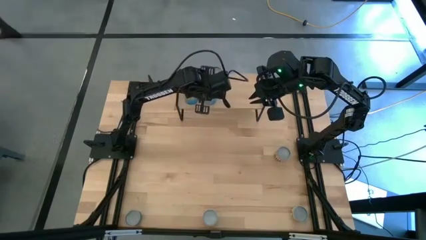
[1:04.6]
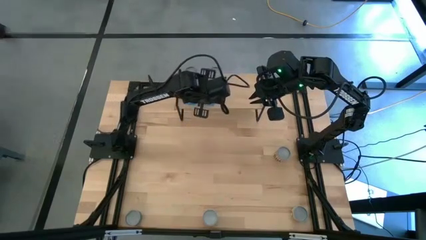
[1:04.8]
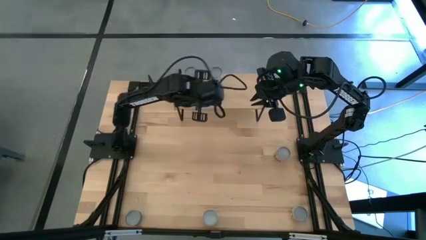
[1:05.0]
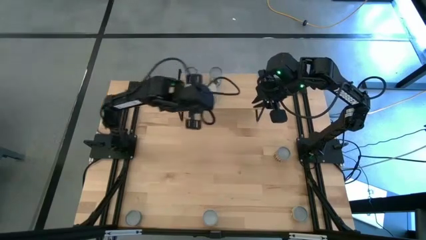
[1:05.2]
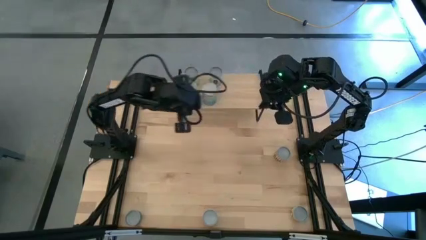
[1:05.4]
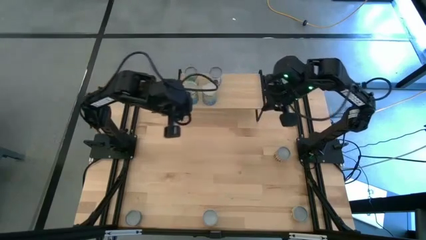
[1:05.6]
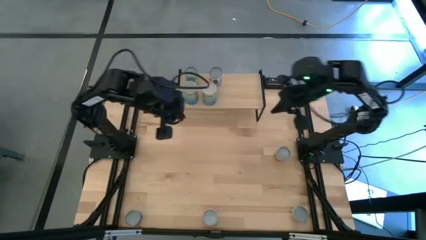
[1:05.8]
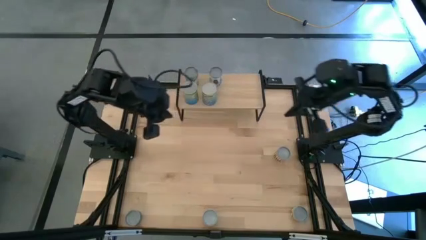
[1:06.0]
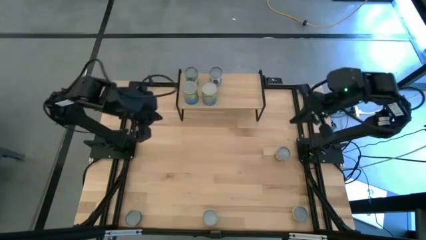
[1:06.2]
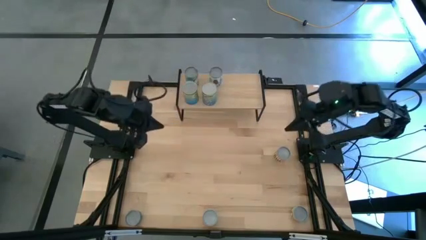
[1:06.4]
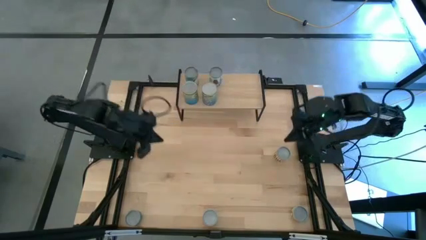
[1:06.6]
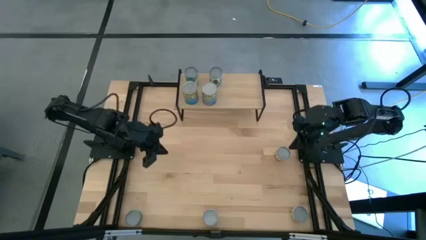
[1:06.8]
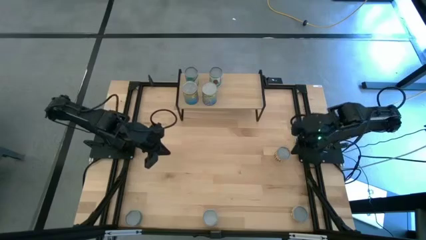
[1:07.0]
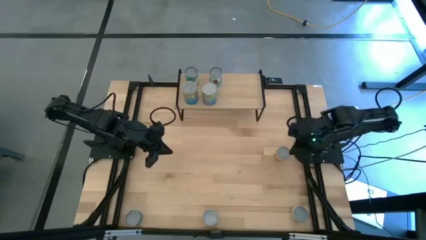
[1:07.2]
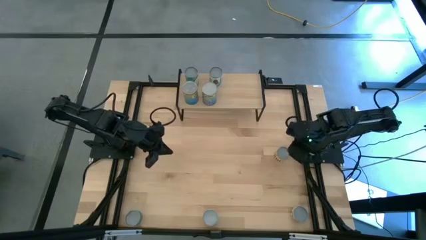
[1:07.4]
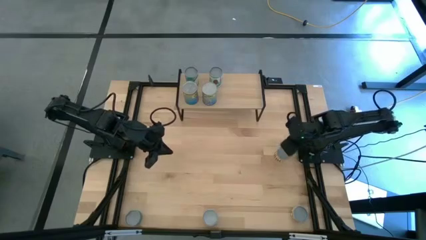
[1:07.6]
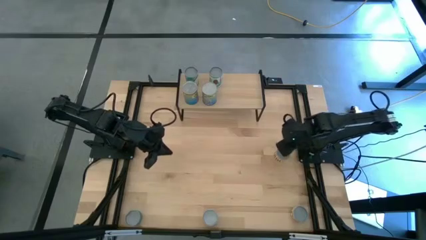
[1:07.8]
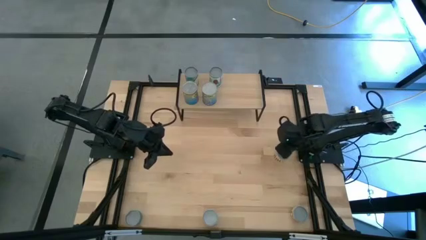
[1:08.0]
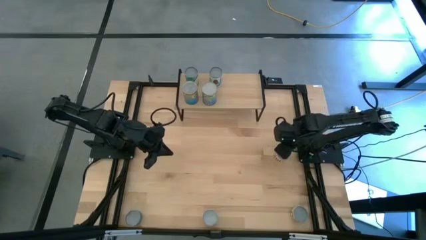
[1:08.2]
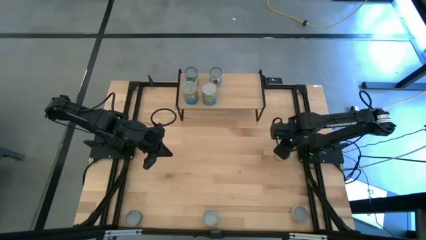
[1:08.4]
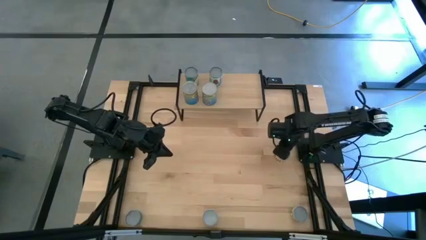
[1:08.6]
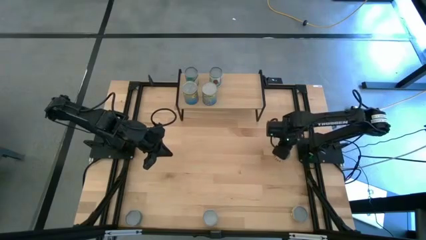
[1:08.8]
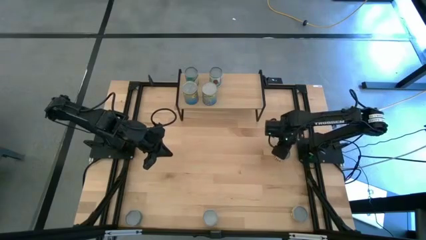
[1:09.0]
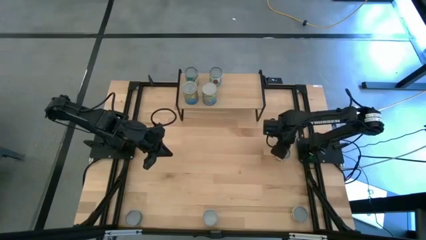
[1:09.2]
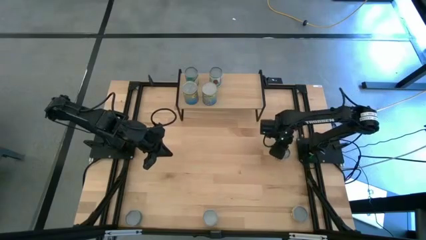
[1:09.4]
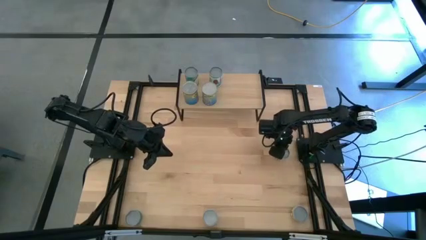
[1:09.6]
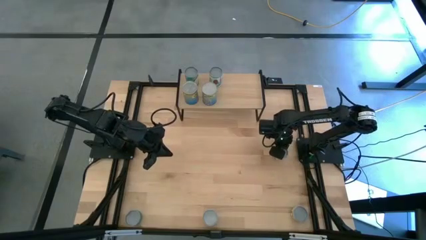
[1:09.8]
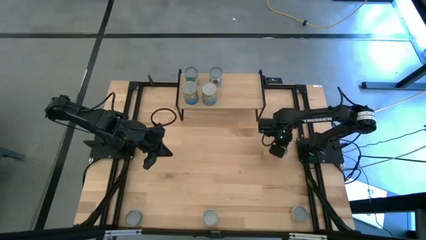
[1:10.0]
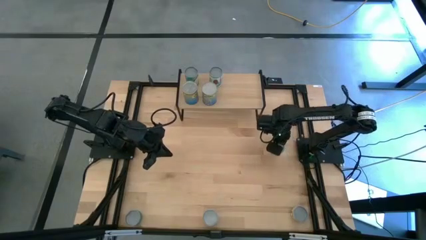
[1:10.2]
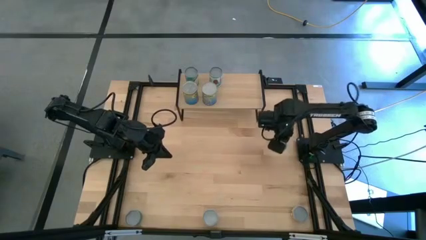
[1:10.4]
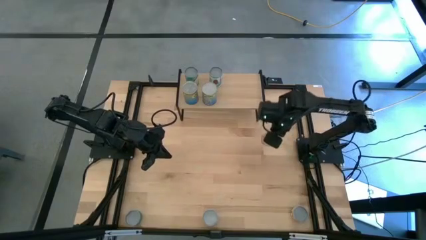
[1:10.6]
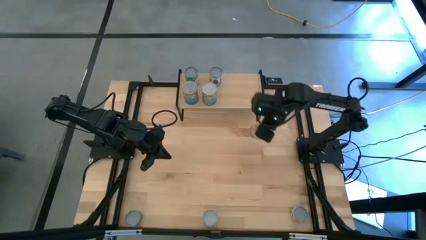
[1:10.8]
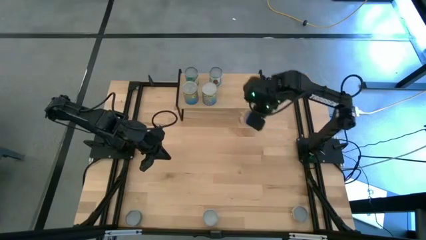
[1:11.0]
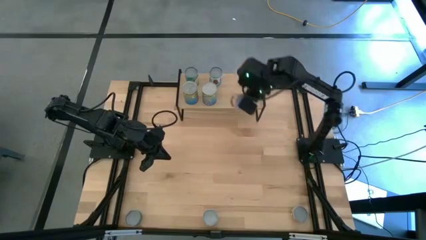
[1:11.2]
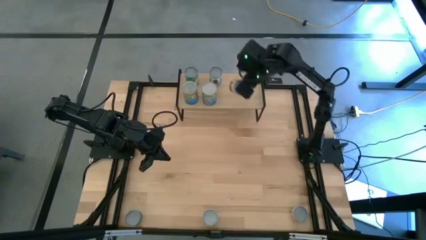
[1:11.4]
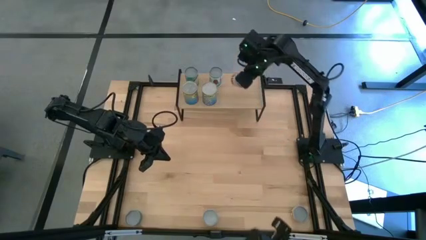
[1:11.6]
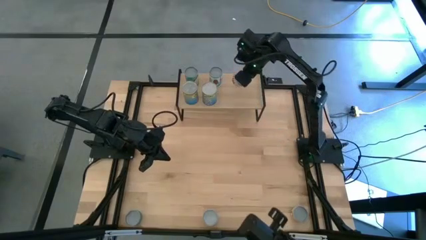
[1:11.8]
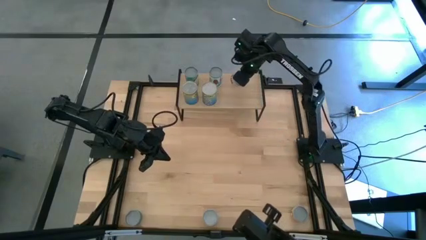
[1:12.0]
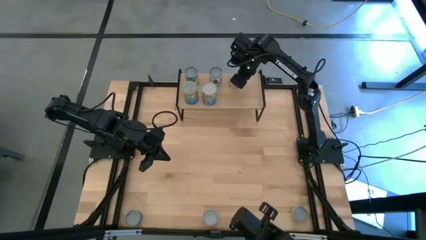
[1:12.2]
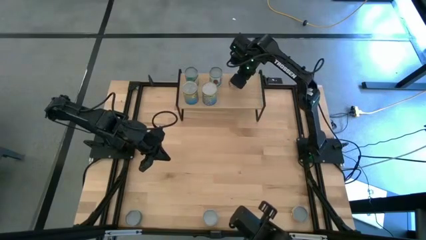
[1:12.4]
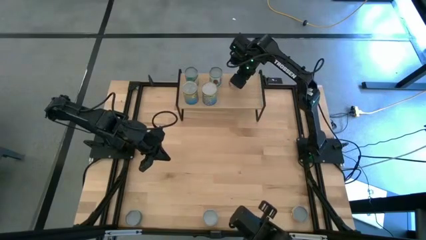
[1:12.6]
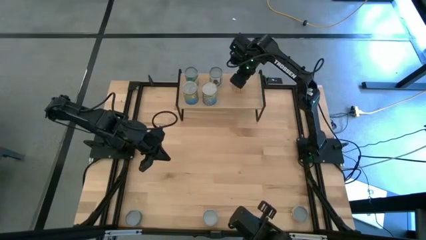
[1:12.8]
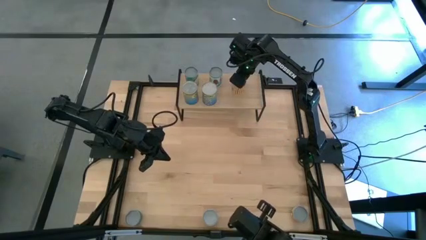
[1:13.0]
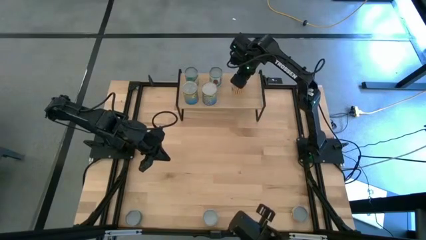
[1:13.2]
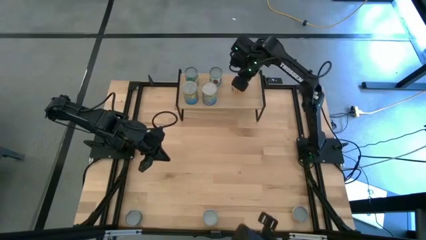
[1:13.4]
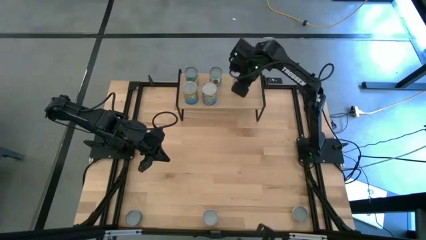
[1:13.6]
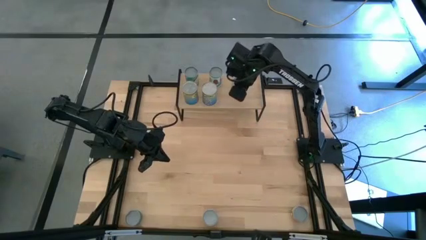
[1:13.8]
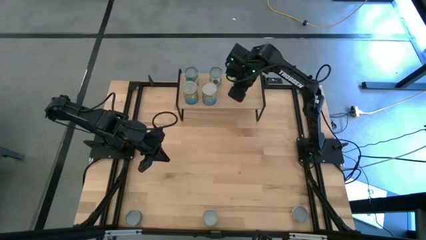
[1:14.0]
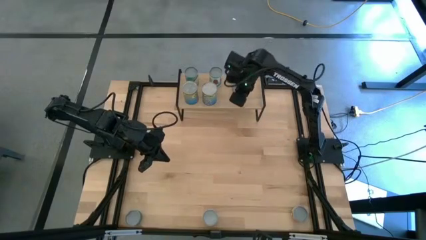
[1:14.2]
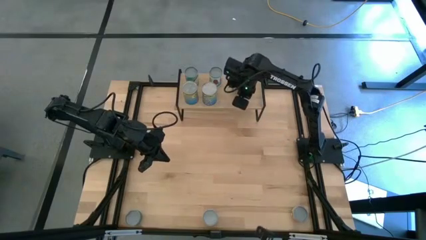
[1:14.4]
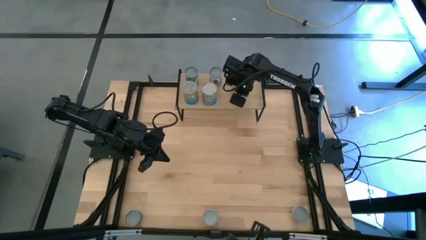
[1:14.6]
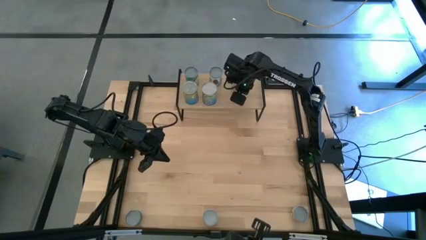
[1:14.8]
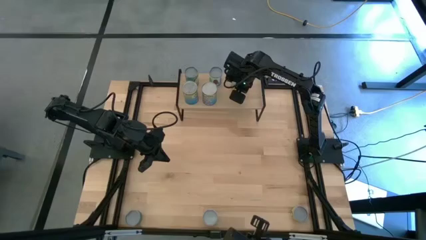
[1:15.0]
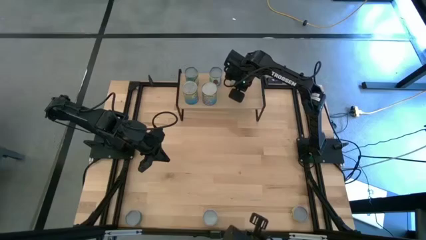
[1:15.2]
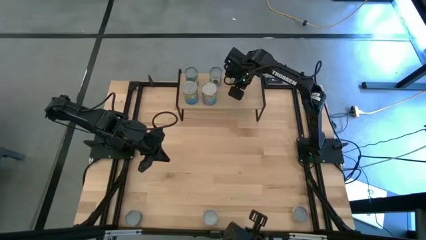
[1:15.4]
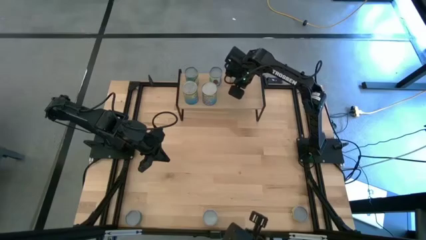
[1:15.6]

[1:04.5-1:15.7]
Task: Pick and place cans onto a shelf
Put the canned black beans on the shelf

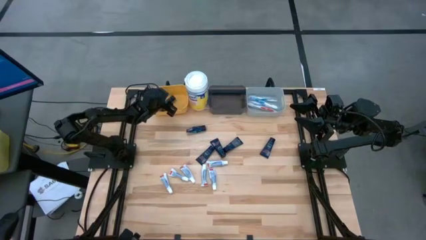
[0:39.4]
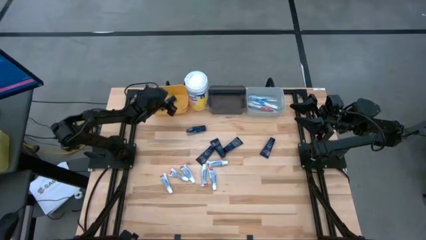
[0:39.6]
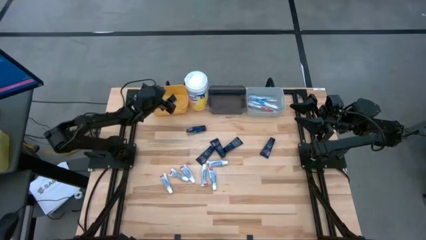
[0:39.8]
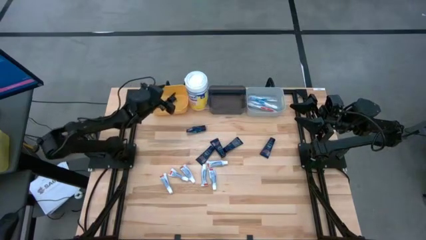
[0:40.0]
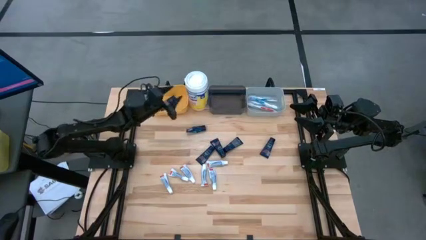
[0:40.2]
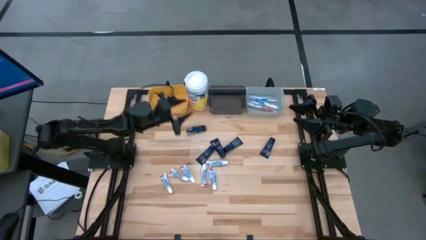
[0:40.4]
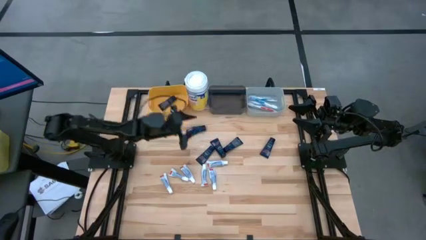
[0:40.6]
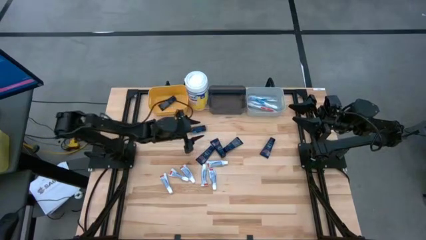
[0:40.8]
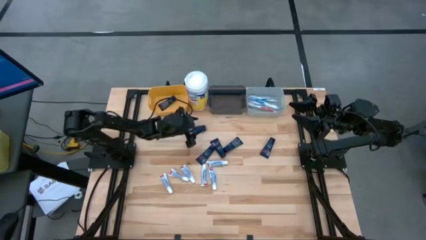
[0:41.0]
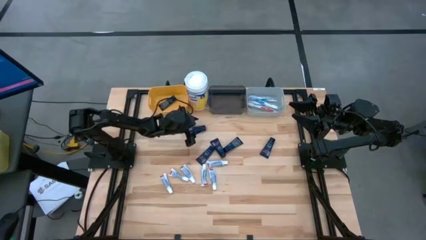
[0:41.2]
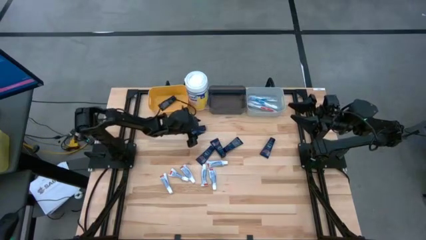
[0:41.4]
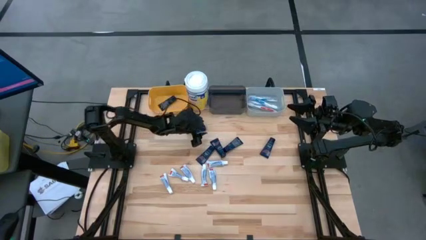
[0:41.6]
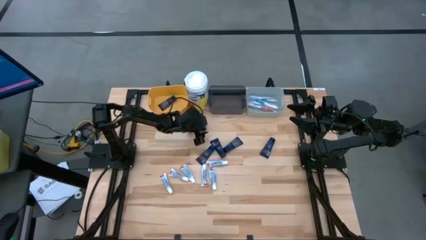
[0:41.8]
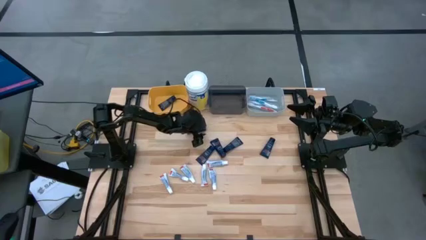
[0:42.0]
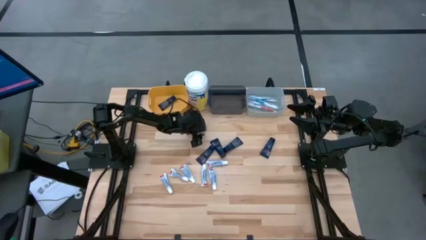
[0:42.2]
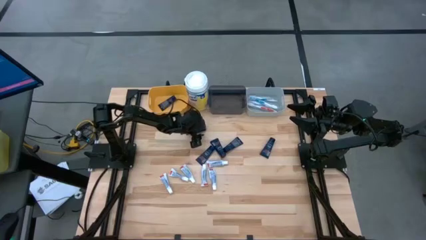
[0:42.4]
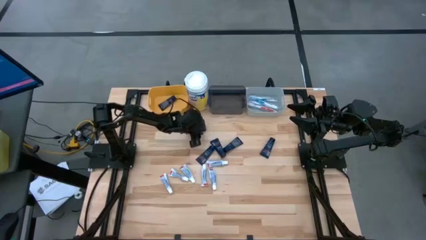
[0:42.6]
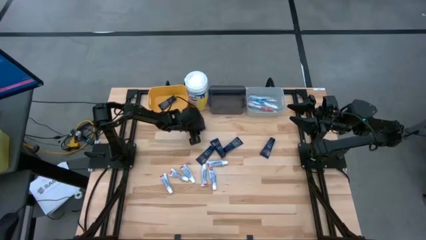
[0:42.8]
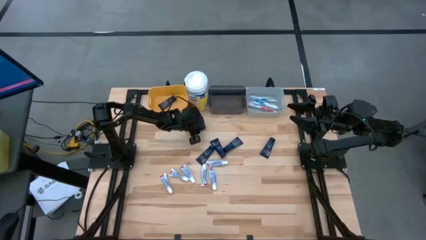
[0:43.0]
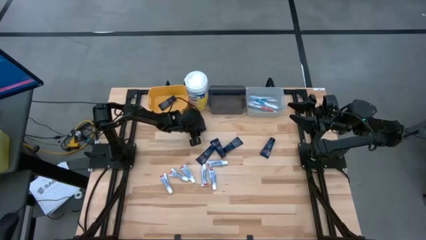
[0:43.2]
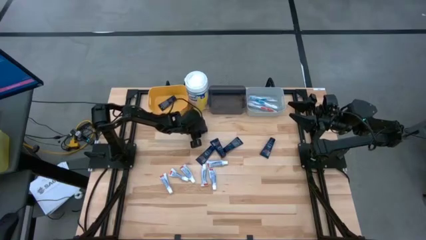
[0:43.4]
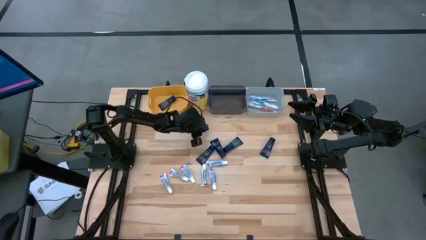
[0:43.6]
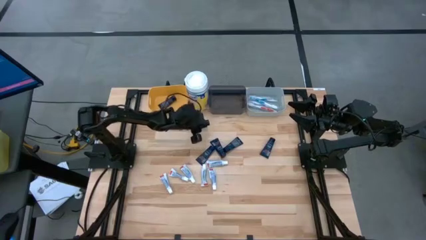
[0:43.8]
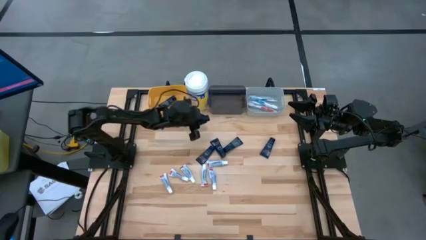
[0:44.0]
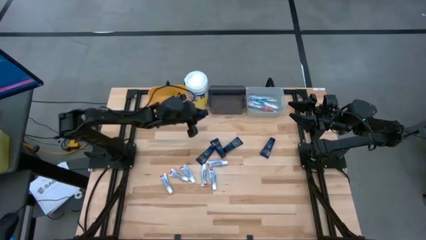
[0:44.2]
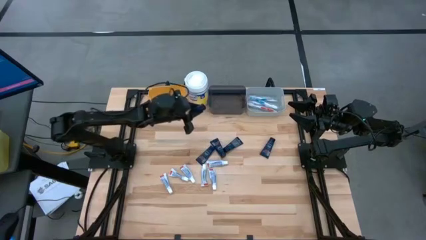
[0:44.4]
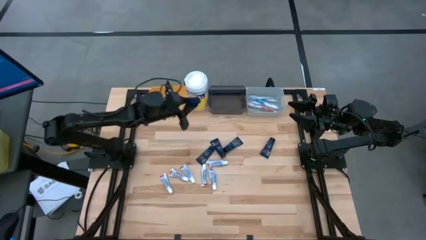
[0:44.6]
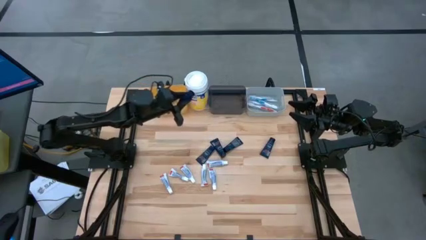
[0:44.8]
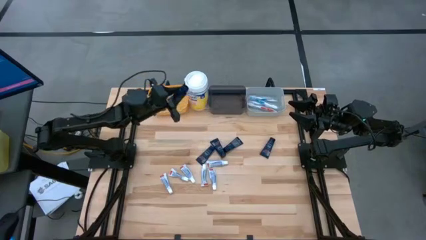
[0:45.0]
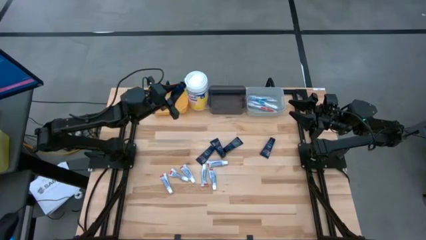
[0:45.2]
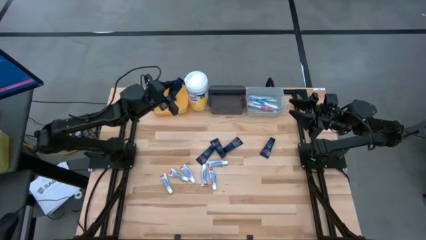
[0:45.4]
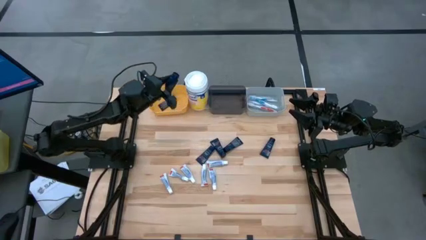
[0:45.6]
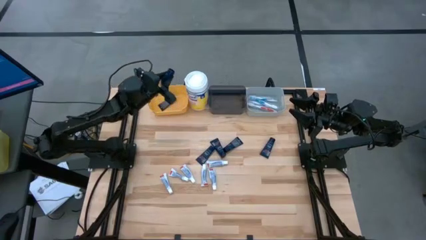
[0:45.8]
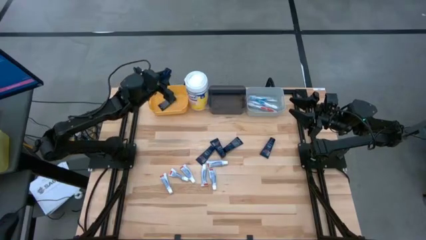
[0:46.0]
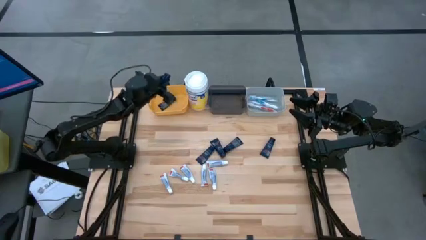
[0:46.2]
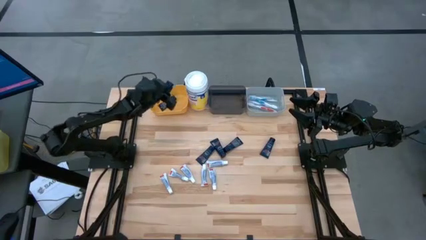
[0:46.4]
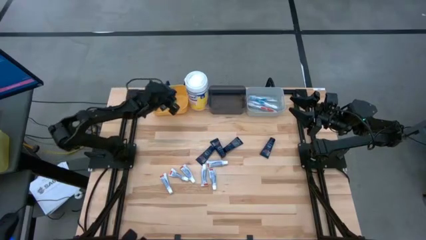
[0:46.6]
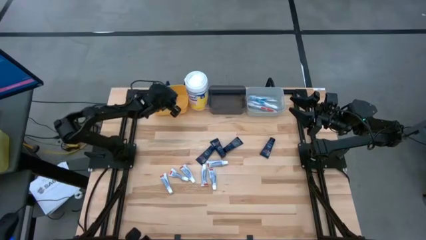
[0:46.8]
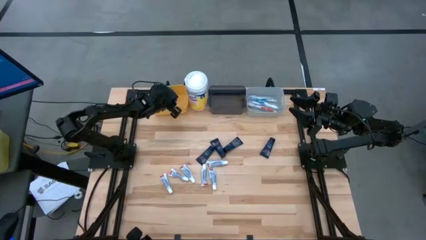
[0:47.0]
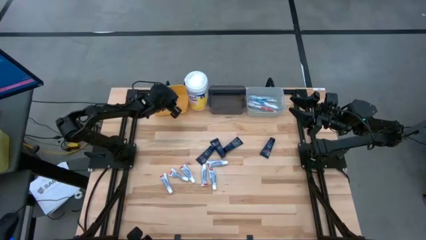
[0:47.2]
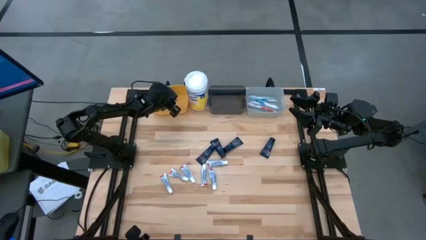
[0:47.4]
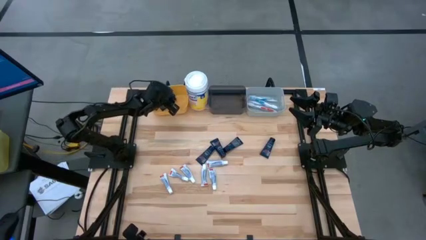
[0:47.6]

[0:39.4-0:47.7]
Task: Pick & Place Travel size toiletries
Put the blue shave cream into the yellow bin
